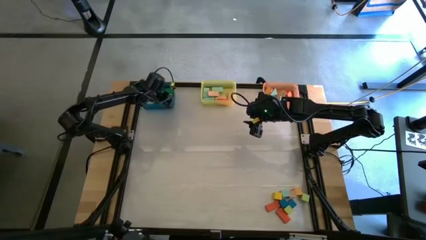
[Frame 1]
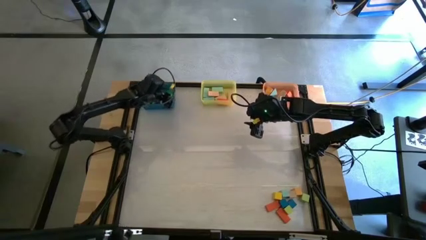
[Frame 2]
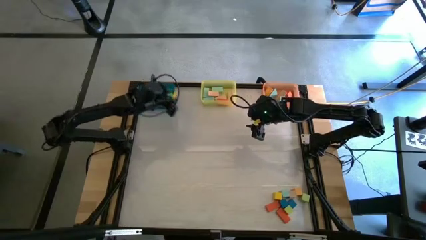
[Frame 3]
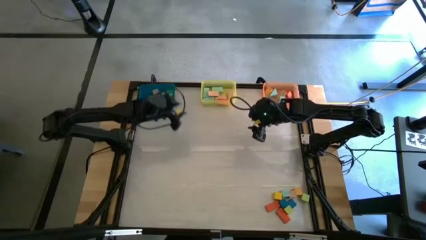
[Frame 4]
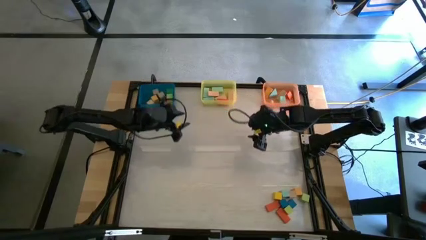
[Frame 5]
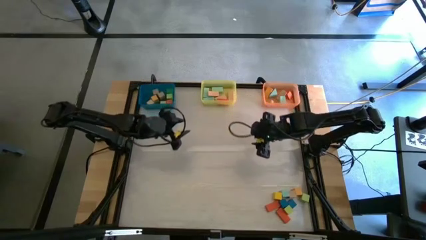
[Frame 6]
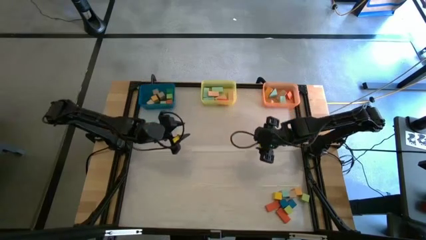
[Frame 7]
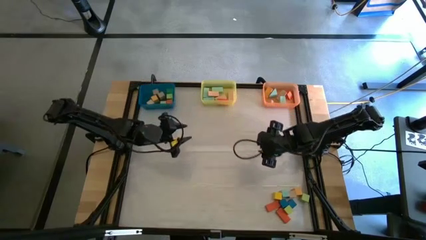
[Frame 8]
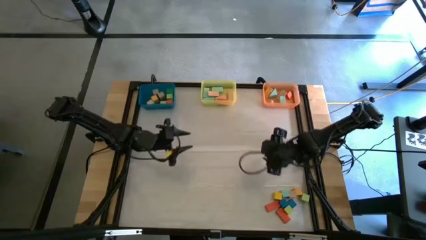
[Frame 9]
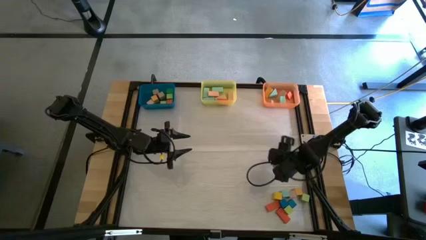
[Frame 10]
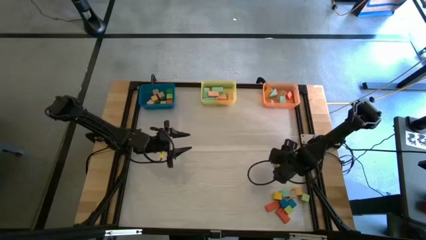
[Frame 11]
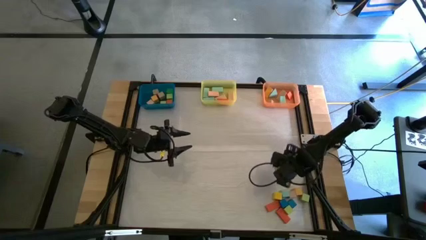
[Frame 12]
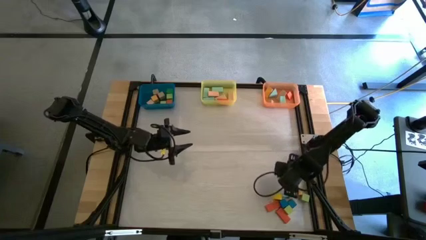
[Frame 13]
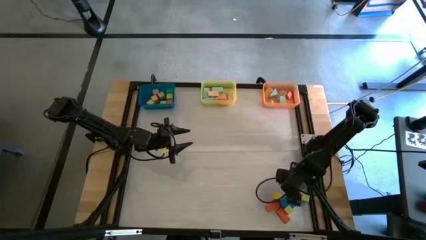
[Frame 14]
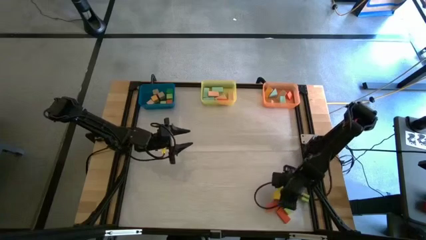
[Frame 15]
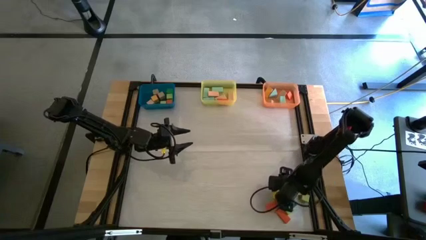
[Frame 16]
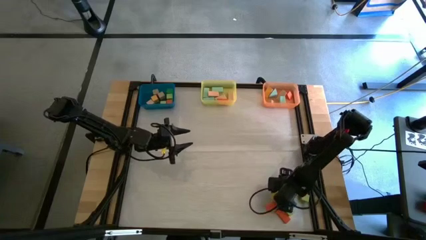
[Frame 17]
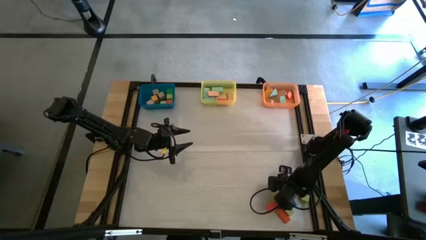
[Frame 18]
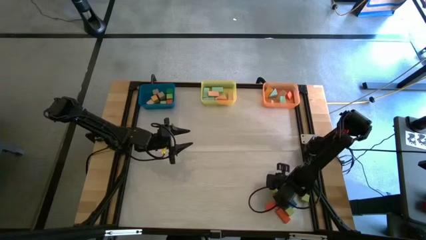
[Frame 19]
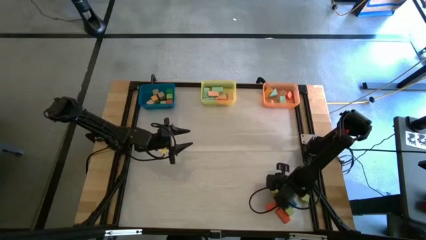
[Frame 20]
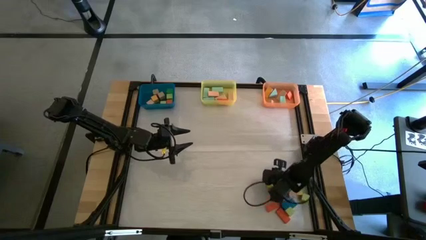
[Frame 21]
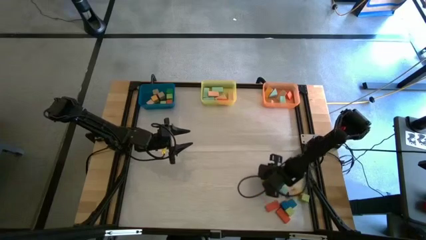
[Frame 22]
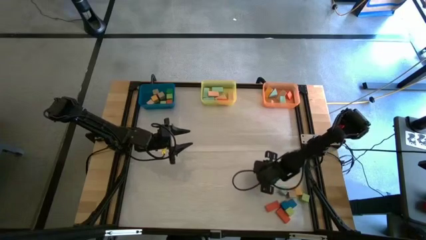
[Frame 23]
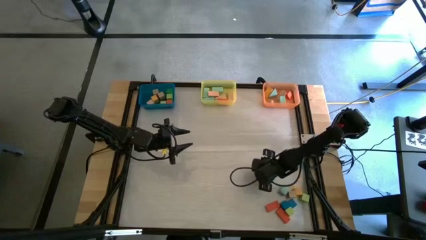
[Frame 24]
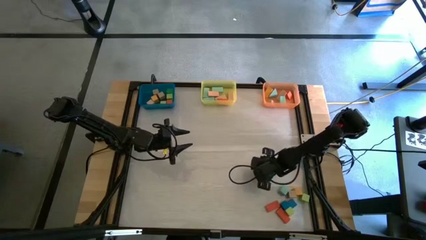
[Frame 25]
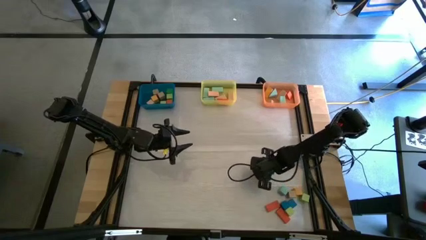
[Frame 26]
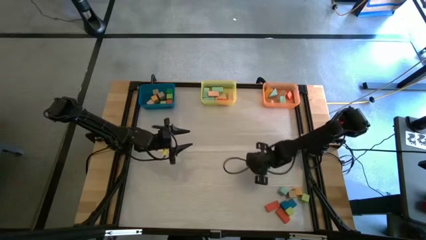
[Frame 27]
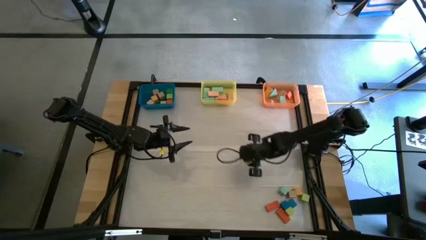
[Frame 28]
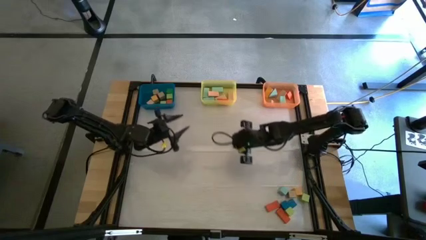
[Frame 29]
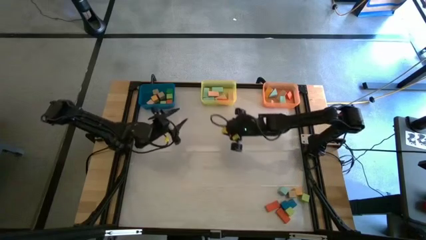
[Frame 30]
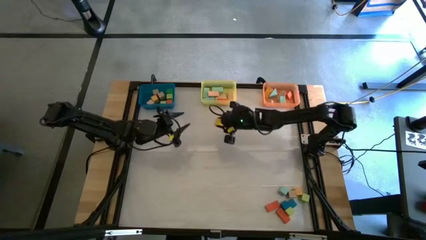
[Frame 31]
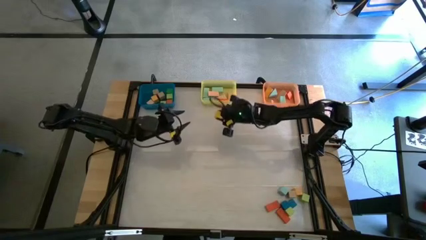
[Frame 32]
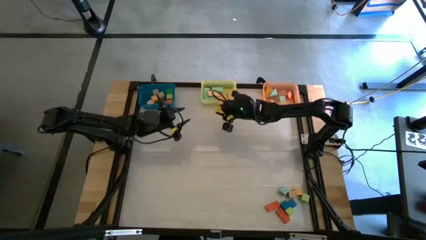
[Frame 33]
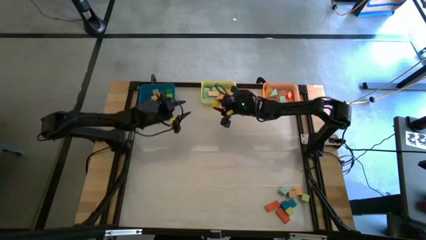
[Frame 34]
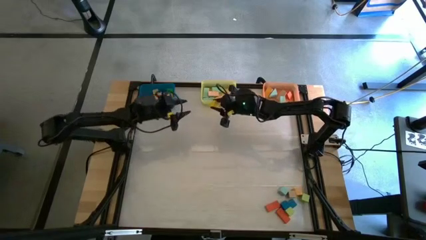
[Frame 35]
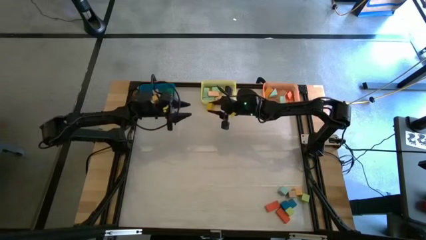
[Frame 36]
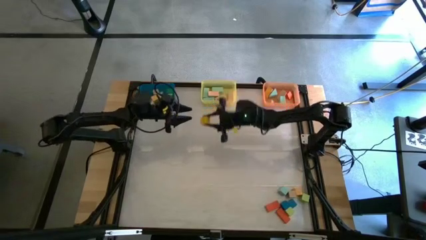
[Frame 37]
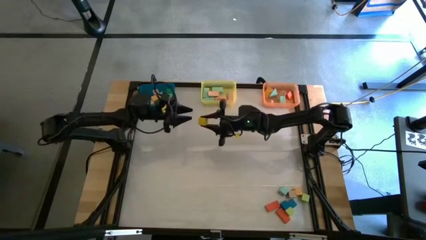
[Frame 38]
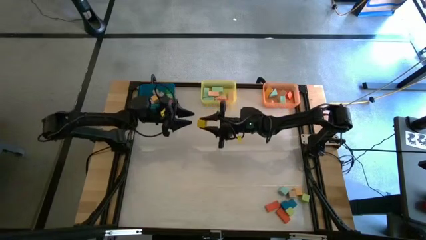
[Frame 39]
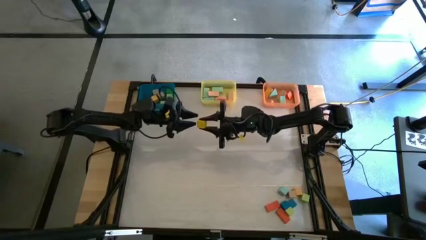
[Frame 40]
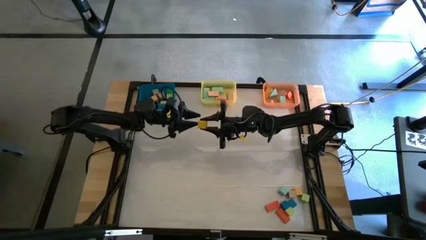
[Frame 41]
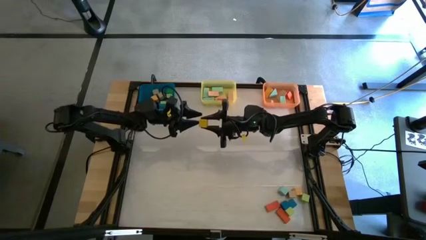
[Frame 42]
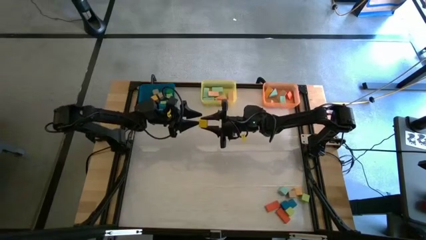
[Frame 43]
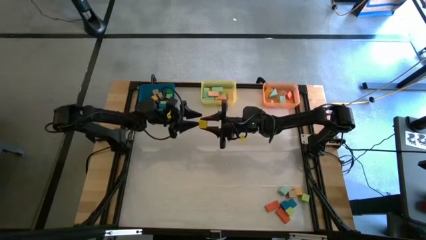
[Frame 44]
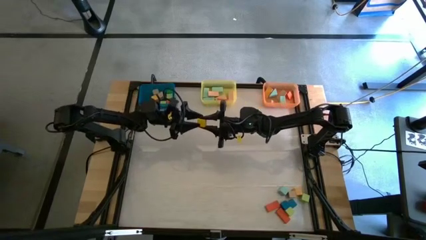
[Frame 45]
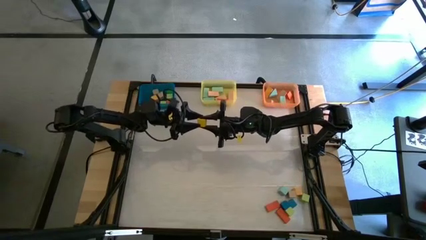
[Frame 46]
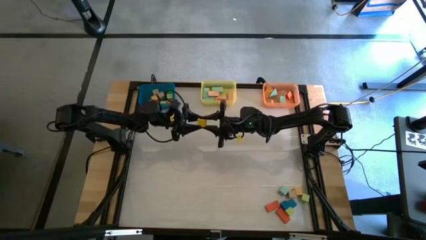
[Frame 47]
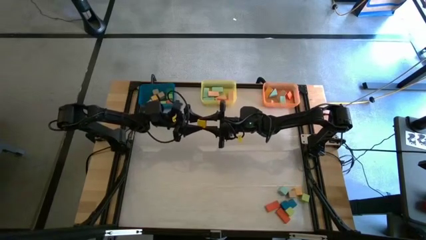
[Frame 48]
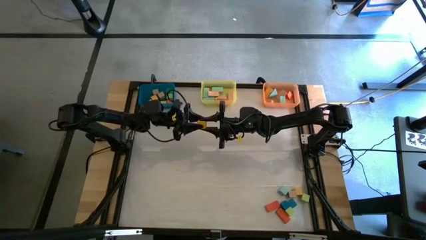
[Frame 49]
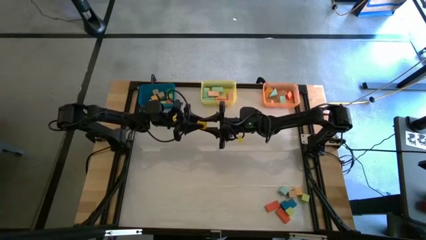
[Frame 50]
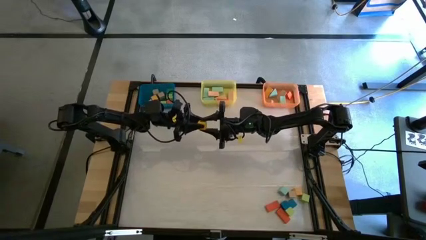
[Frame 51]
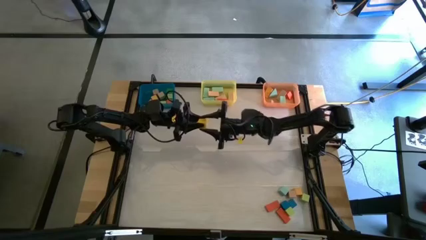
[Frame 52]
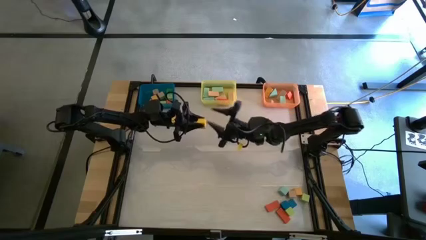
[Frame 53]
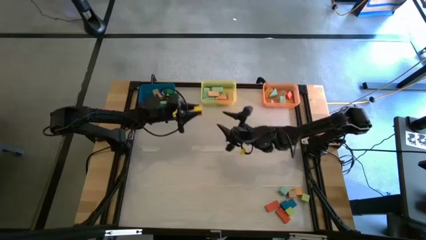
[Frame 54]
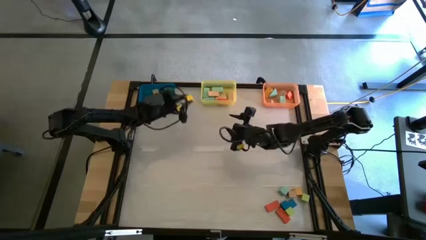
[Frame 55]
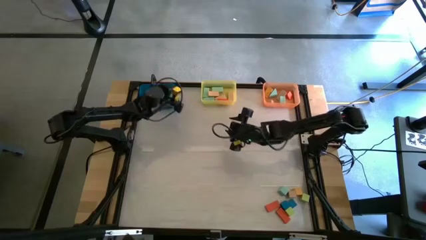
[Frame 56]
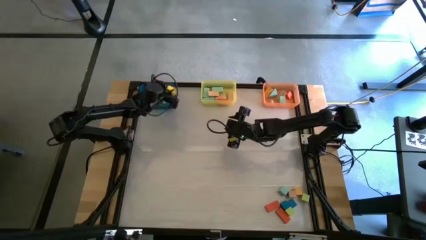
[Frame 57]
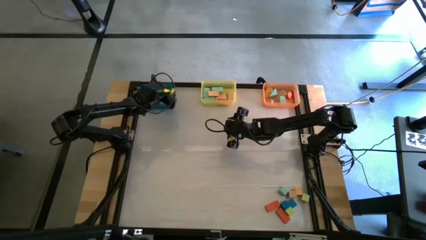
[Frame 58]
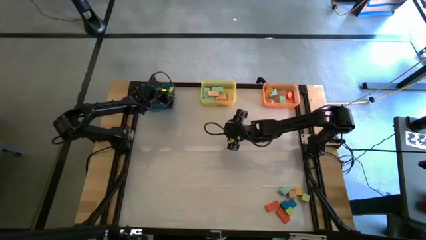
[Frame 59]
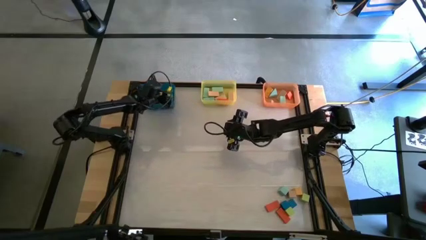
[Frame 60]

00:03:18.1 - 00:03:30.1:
Task: Sort blocks by size
Put the yellow square block into the blue bin

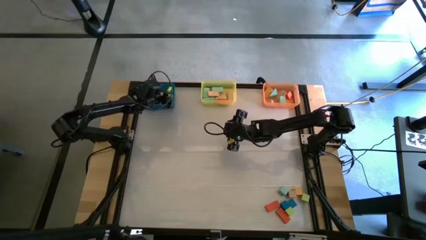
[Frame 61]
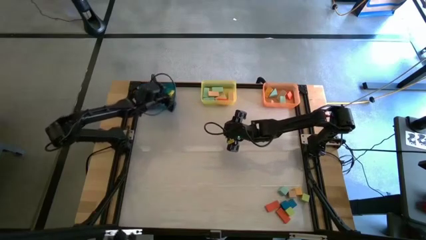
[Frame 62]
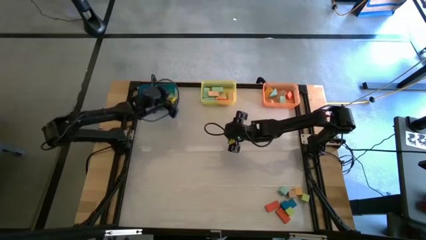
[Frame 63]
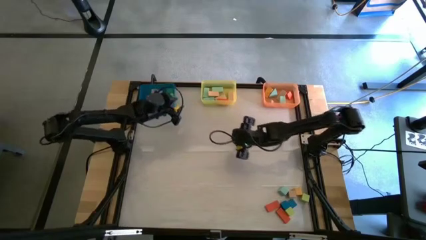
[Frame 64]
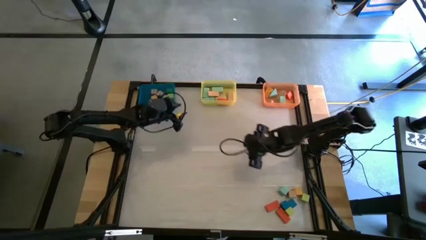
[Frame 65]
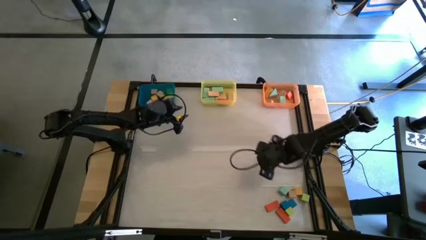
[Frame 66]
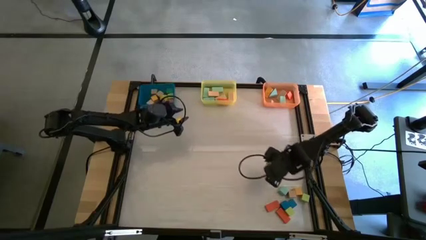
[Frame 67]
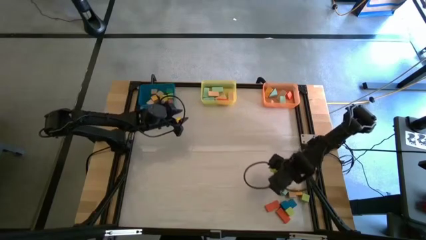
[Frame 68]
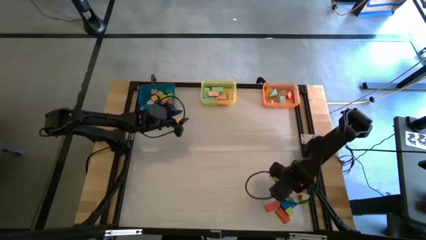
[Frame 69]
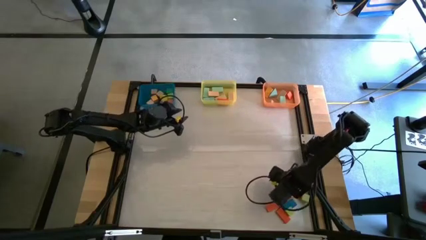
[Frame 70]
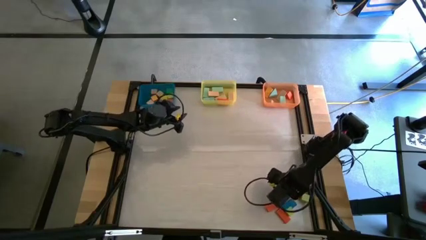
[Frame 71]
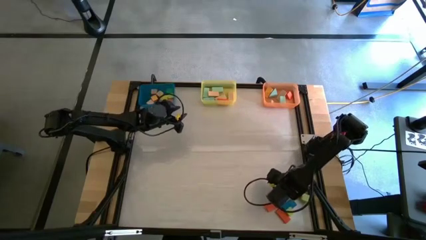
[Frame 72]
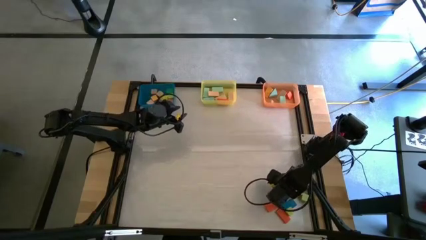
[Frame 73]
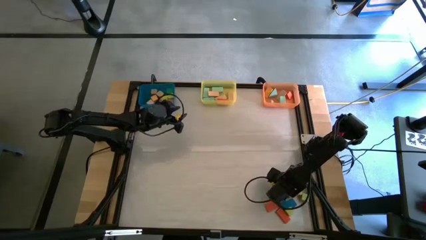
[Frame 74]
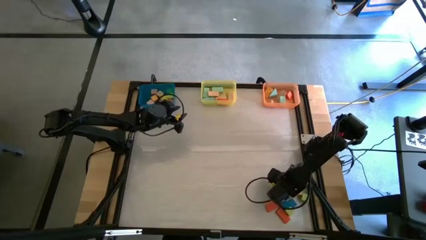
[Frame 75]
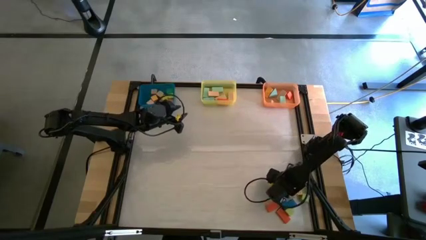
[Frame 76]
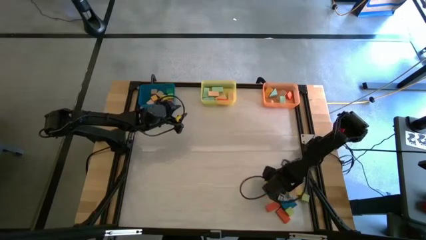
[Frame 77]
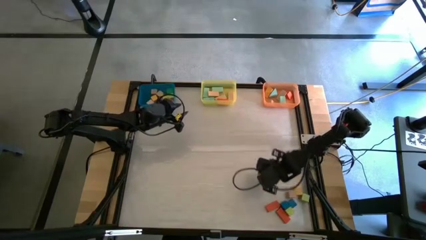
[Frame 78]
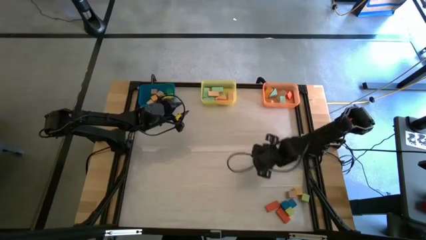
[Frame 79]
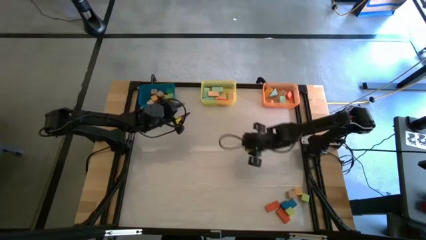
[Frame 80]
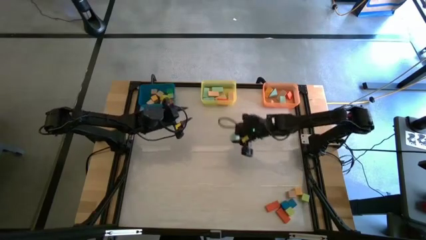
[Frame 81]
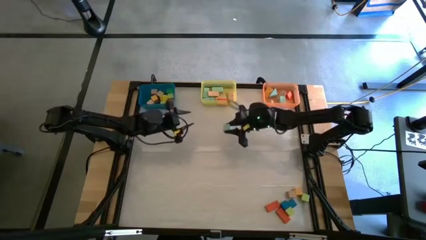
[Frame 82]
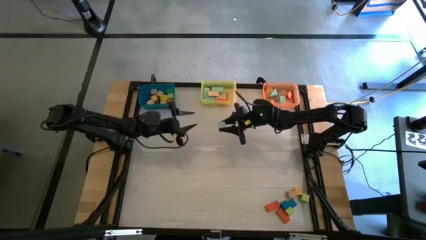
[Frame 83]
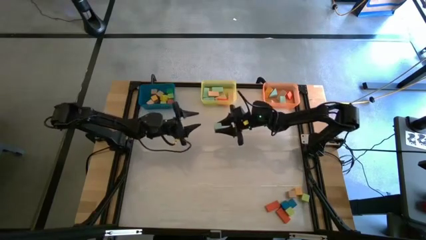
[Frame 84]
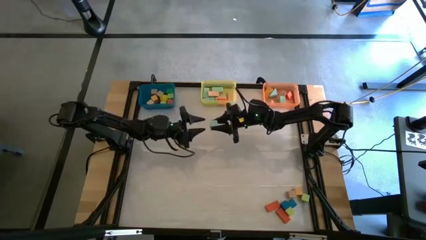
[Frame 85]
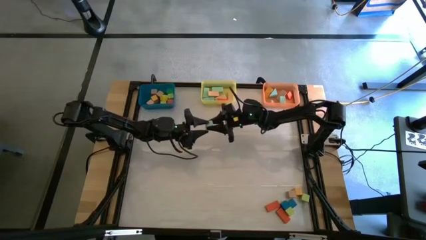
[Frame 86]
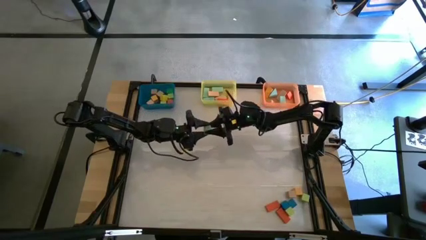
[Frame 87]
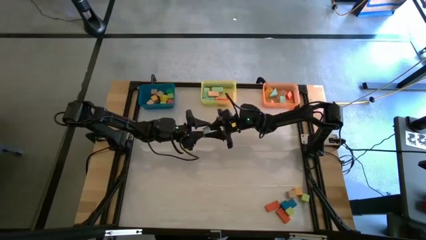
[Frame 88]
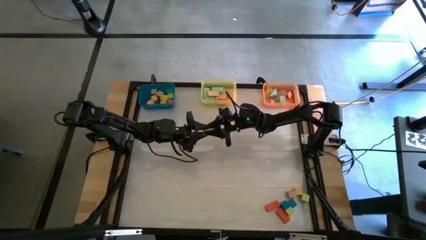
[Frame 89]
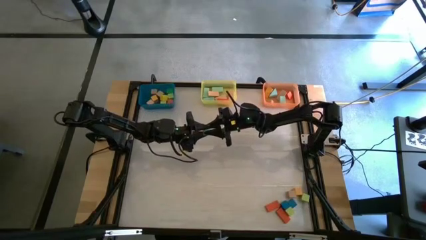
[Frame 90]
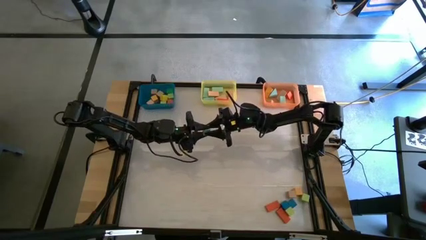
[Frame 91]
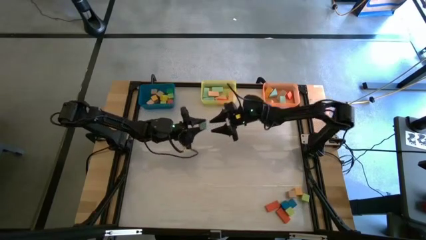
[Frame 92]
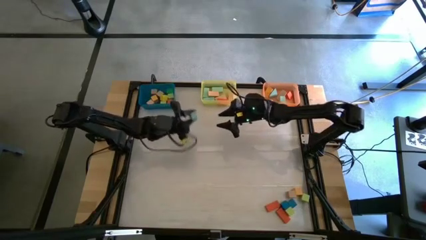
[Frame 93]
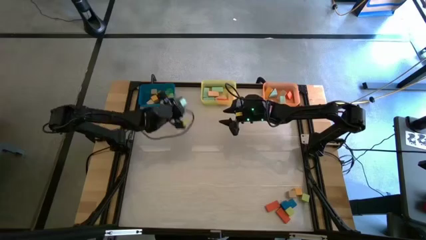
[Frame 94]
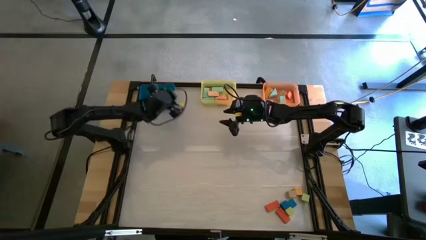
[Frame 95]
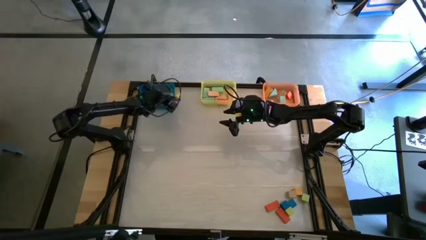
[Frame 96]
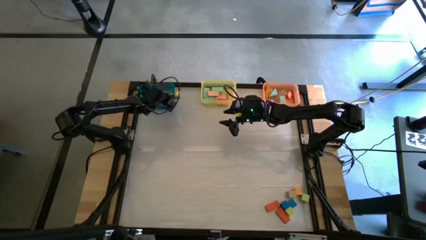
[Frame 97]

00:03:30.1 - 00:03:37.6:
Put the light blue square block into the blue bin
